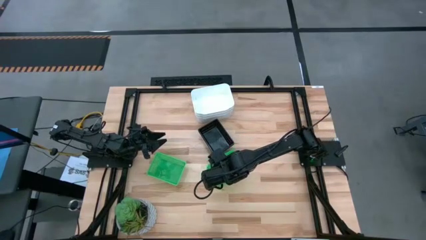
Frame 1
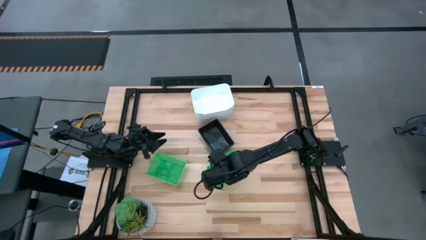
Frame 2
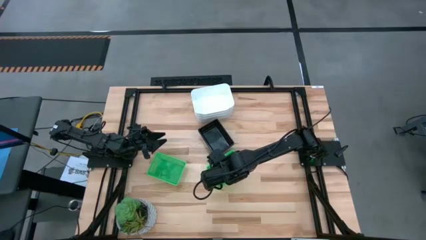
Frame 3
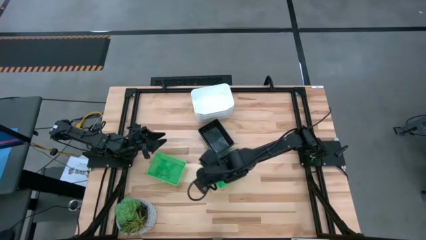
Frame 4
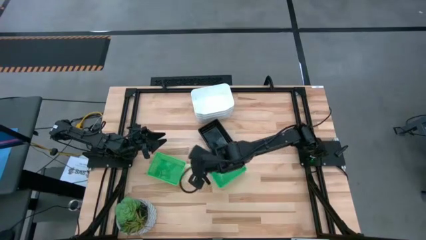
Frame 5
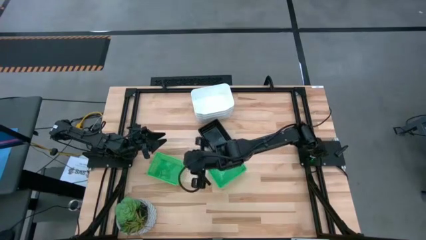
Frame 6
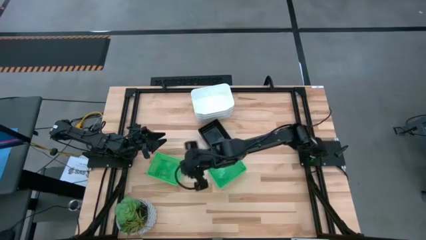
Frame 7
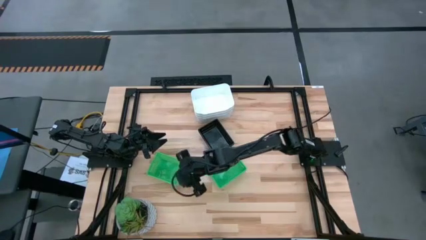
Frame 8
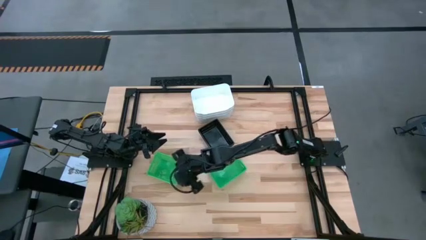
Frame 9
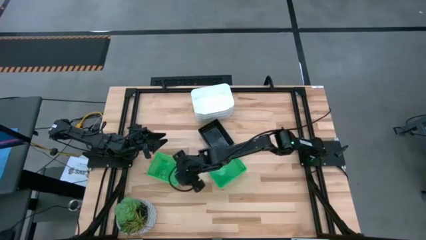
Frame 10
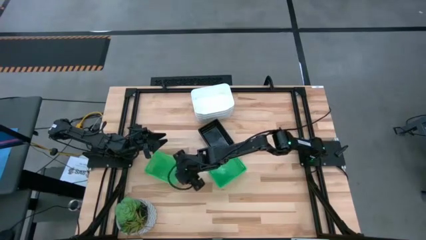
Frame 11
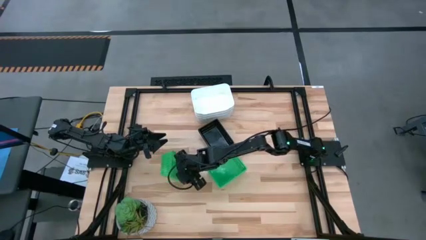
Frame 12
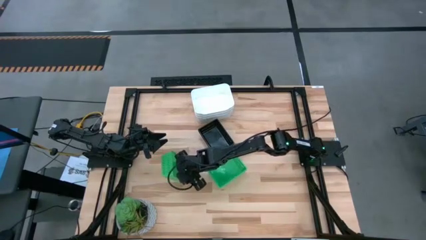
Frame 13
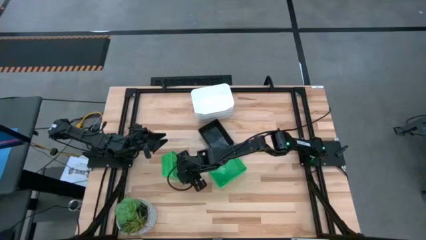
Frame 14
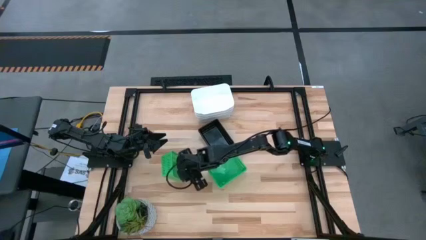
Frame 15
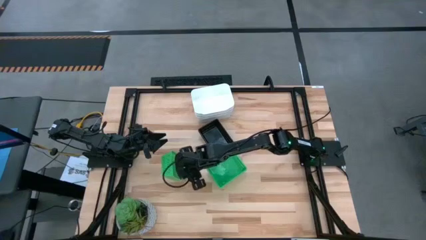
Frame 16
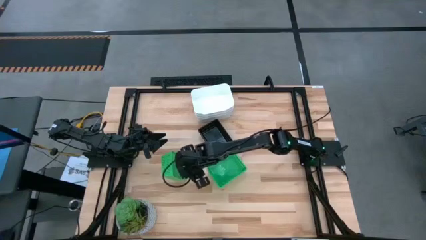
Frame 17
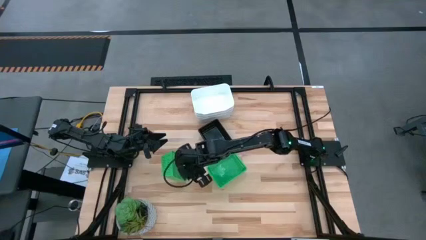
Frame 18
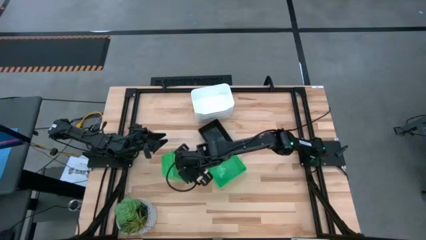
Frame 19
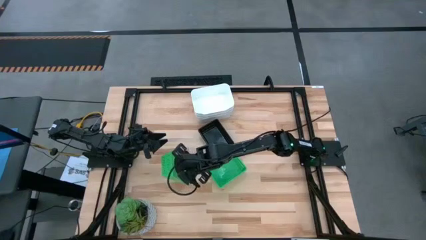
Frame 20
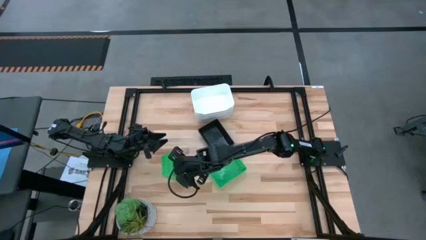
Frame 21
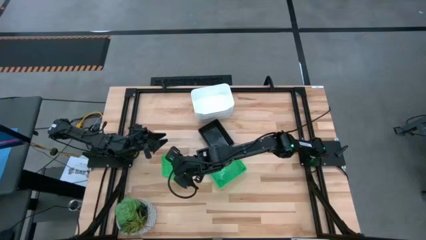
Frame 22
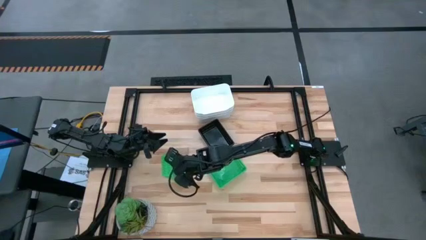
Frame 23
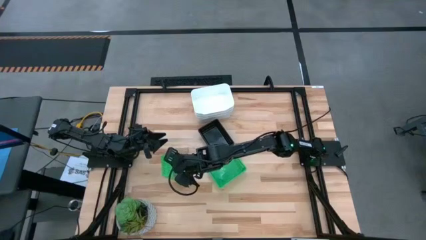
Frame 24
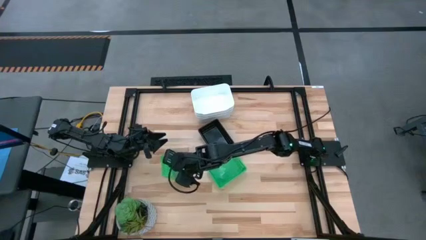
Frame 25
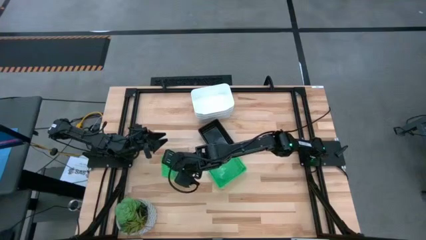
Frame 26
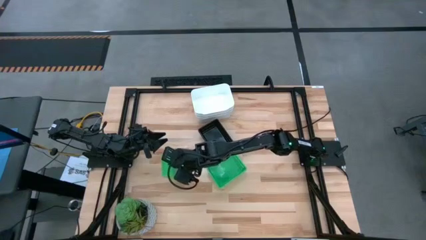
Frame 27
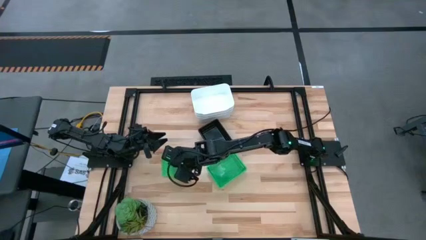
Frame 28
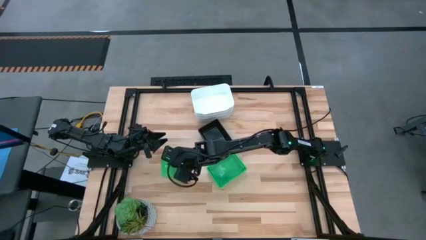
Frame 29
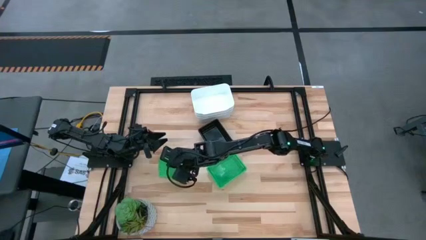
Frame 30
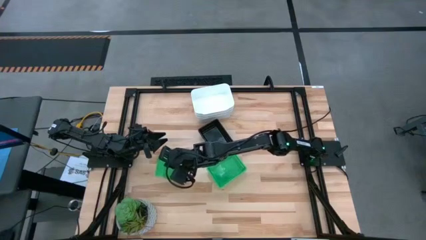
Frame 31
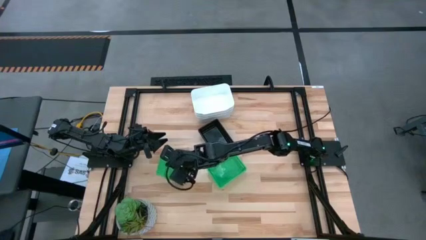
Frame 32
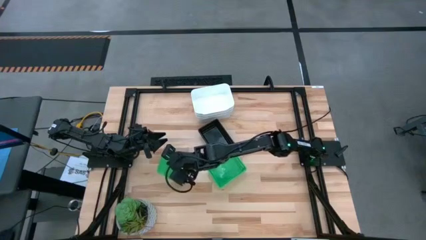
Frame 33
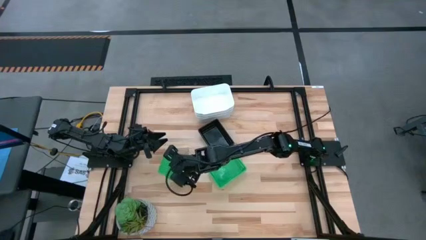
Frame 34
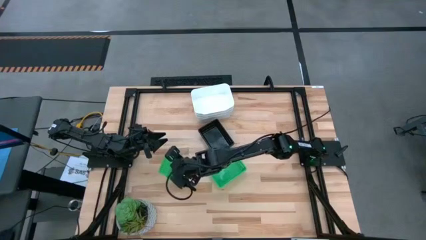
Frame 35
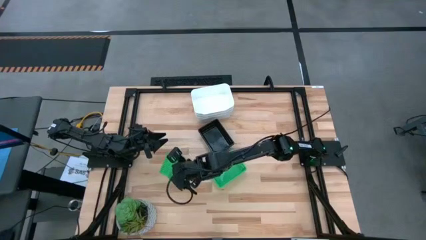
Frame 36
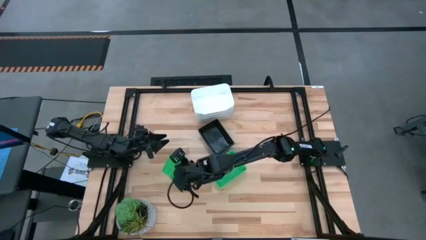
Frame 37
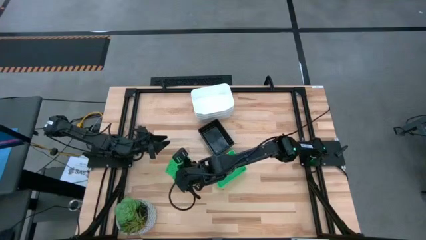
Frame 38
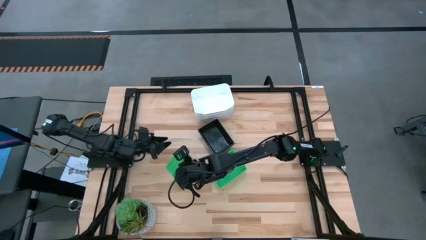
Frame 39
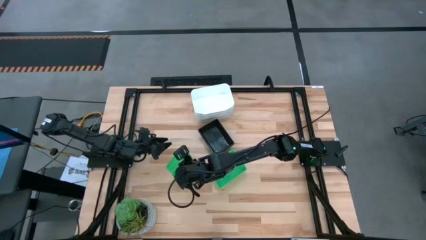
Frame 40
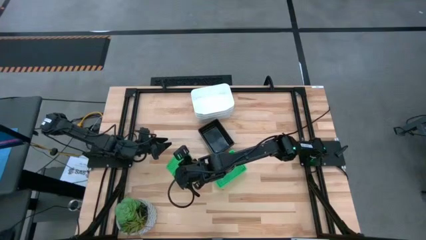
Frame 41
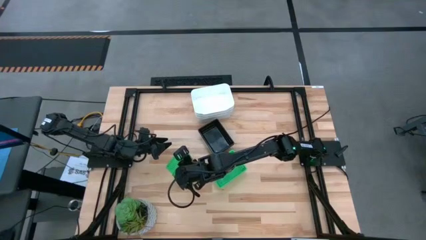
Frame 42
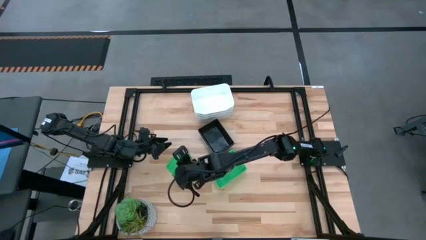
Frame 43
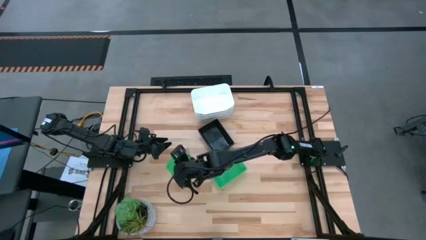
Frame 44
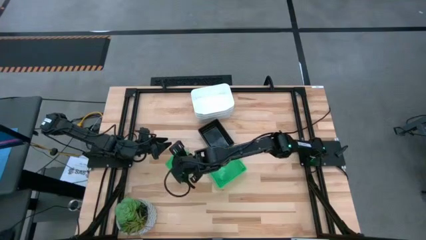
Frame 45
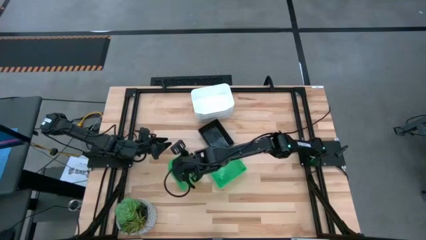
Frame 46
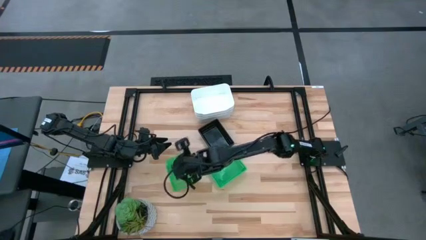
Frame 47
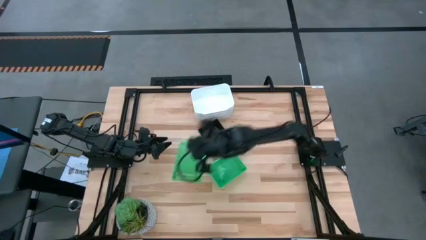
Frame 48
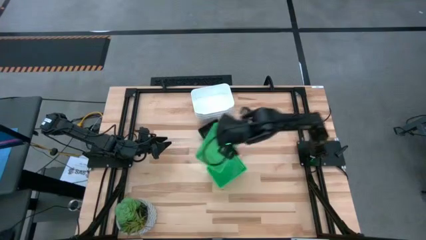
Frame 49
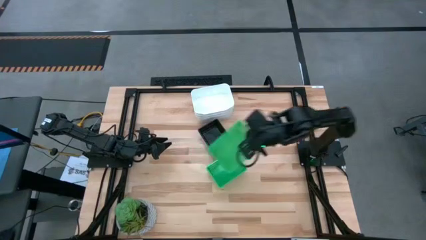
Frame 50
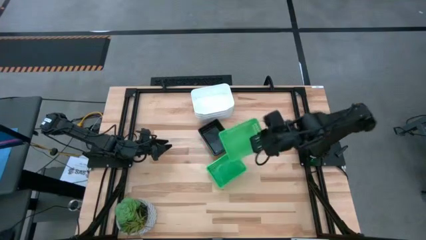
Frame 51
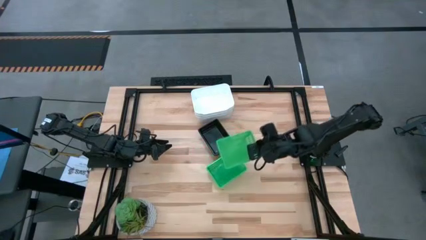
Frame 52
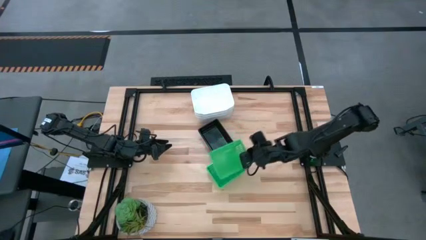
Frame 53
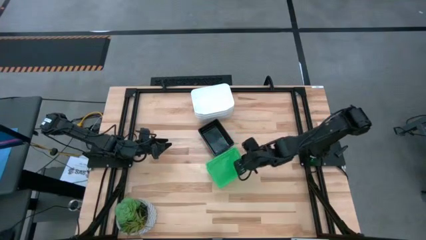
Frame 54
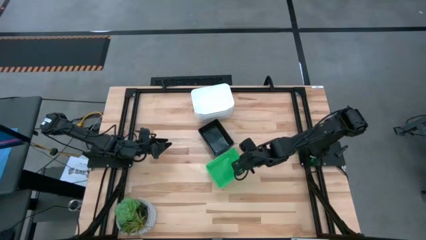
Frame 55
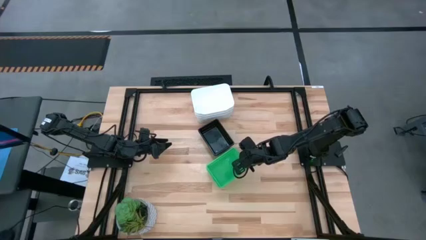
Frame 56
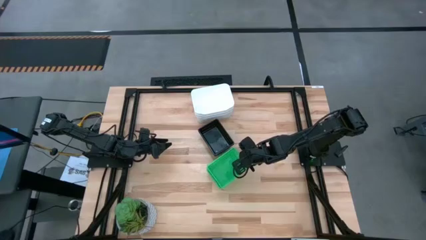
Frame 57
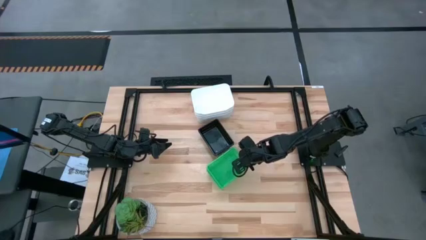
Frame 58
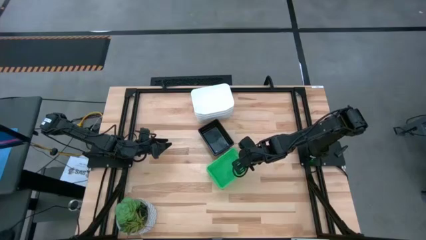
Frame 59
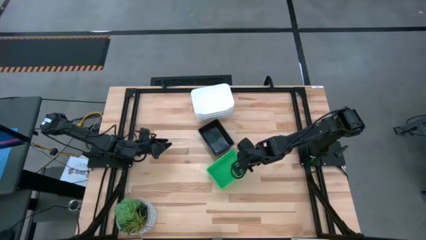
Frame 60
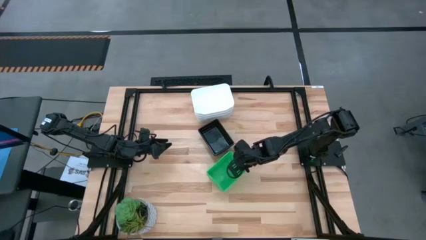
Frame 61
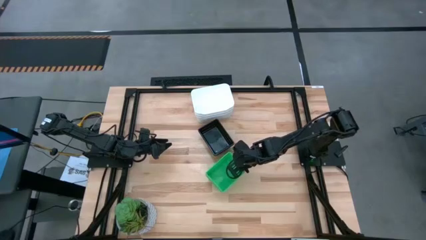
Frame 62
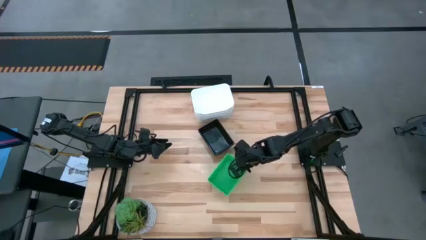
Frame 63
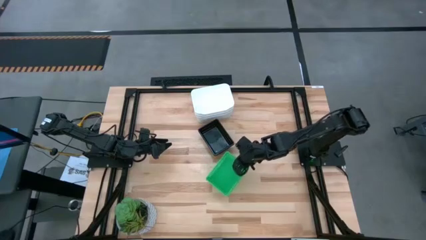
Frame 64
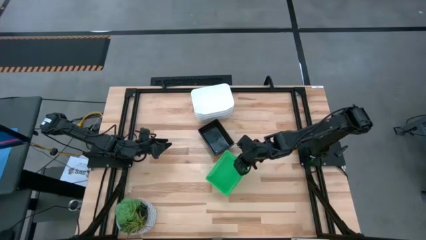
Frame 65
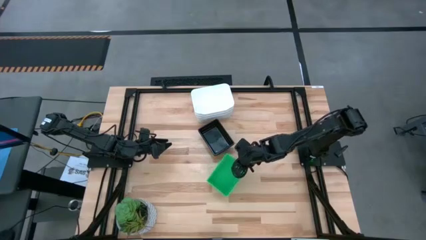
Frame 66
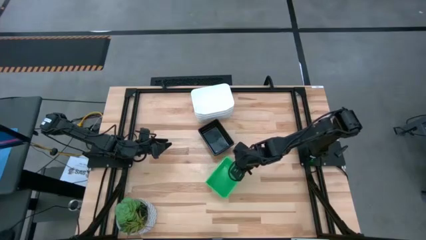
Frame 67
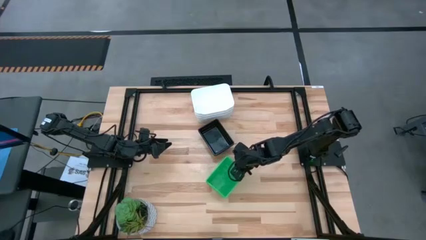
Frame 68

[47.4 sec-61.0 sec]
Stack the left green bin on the left green bin
